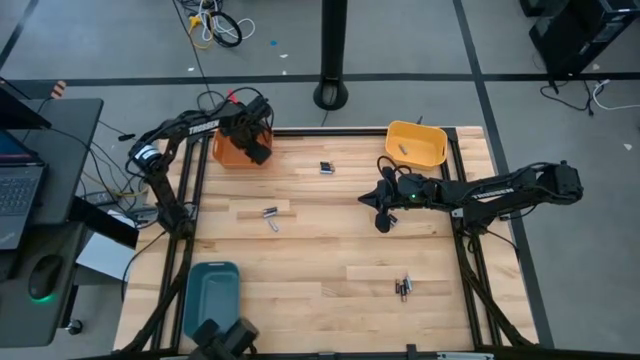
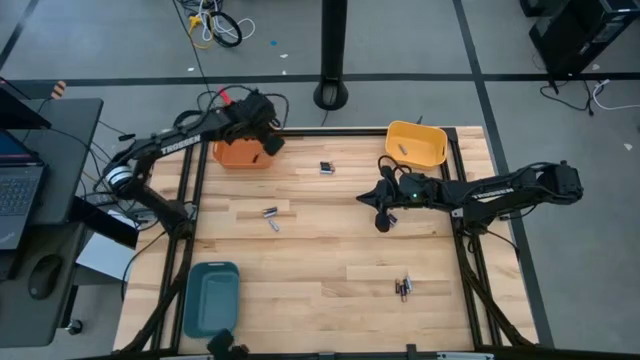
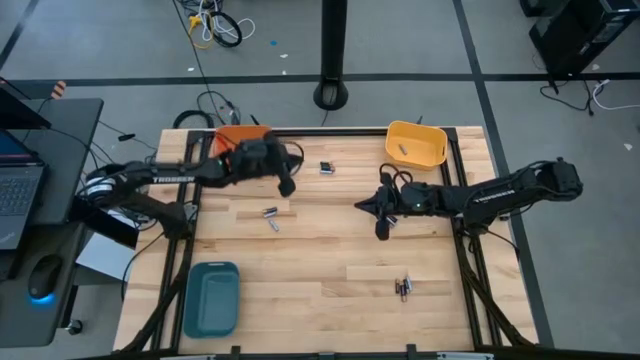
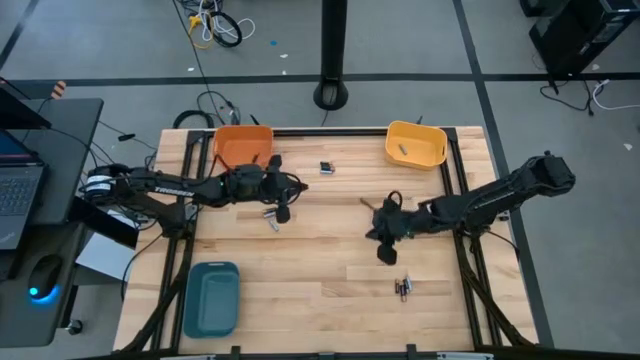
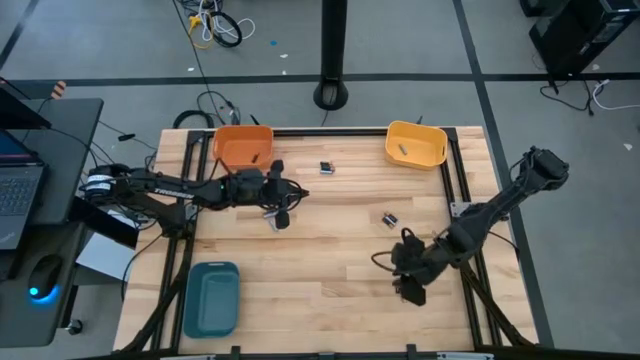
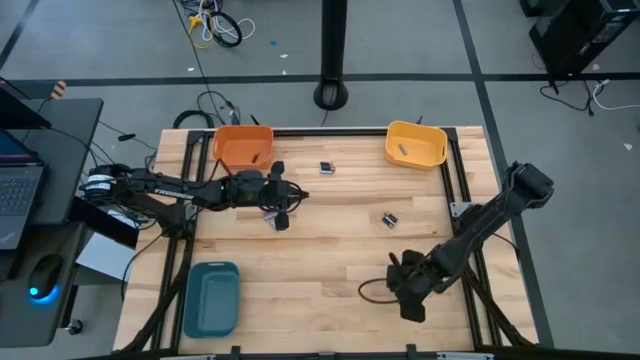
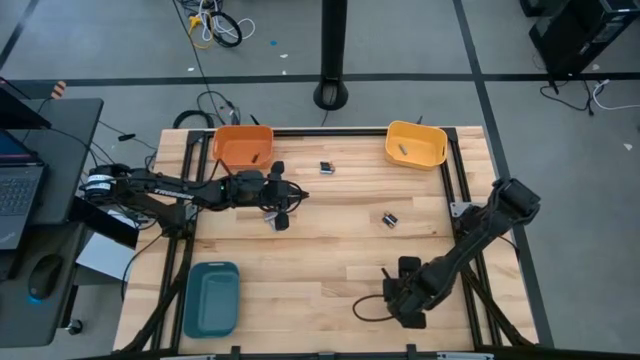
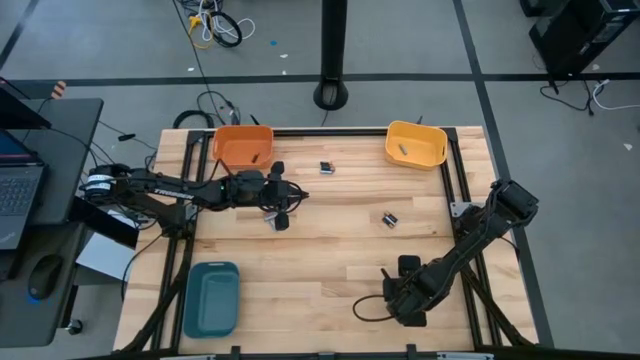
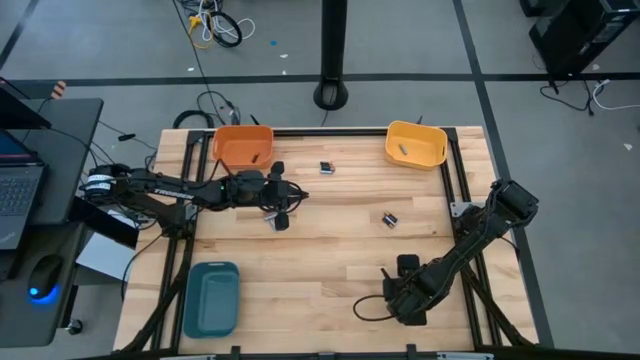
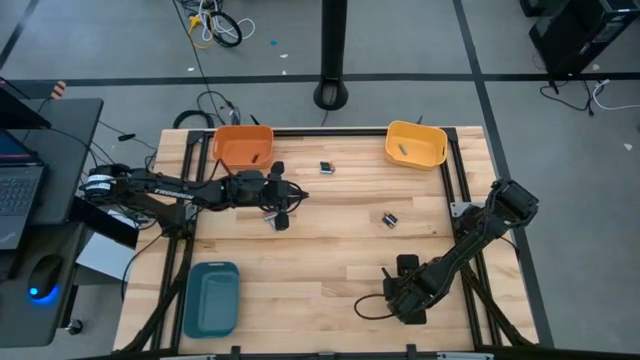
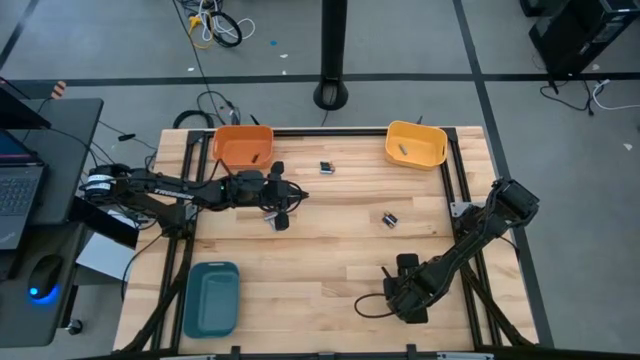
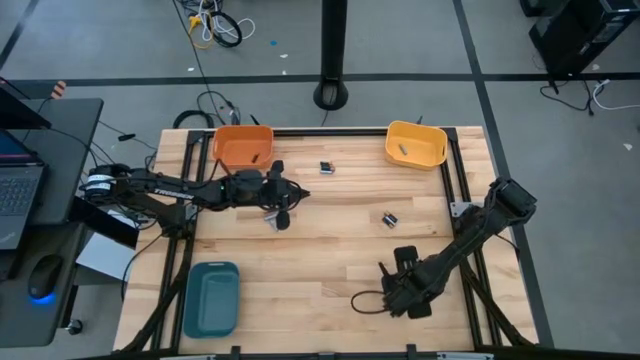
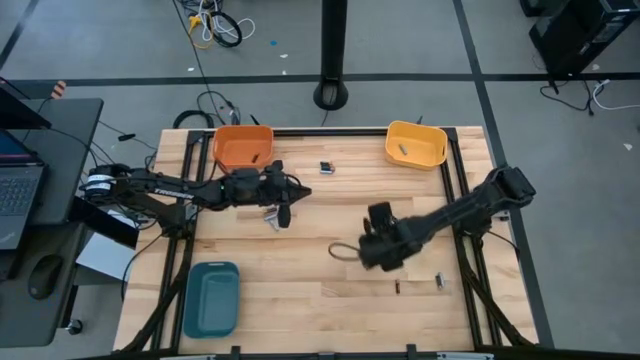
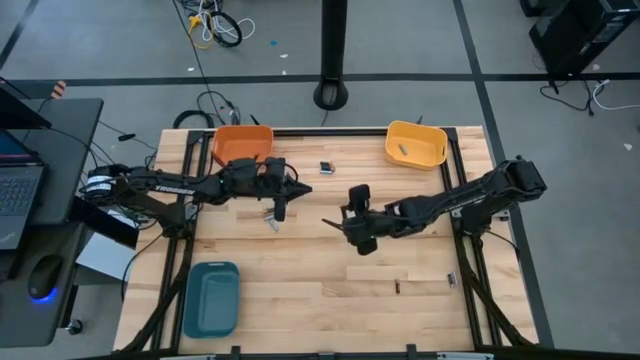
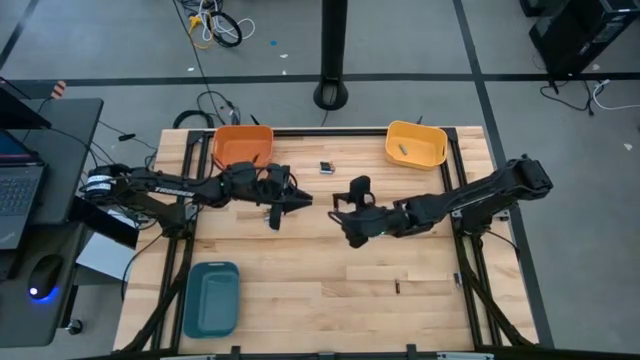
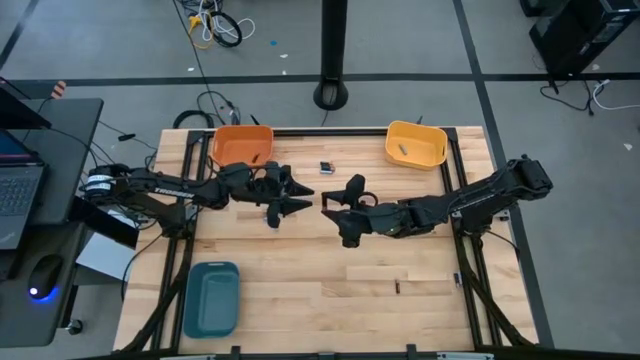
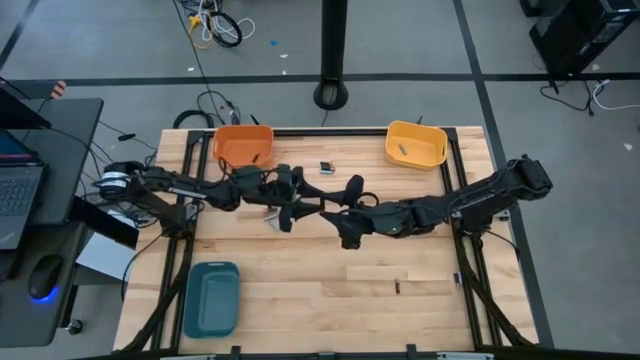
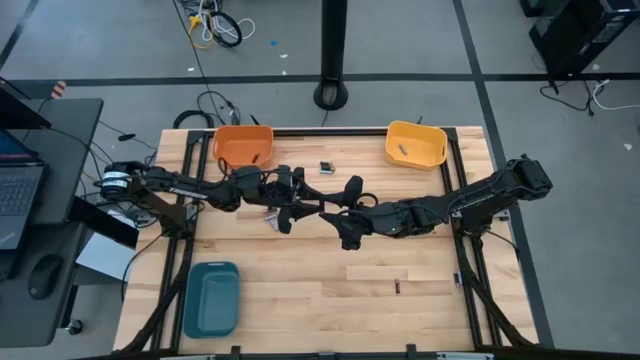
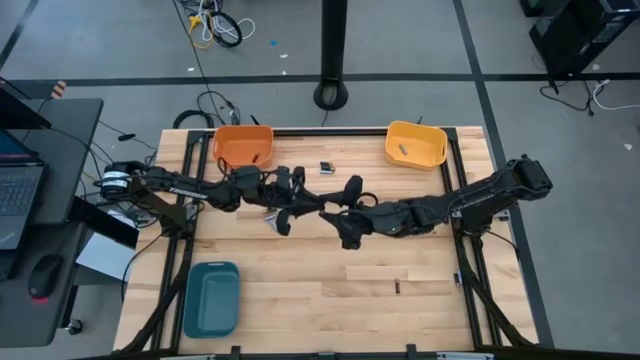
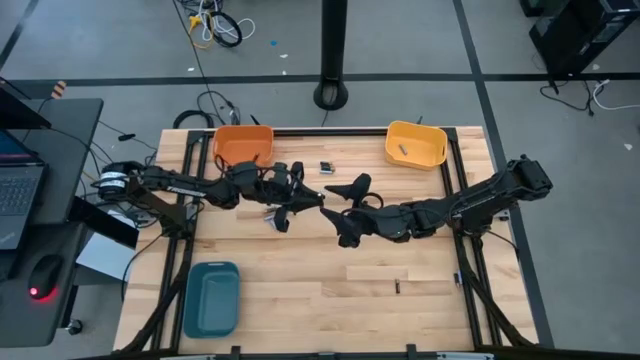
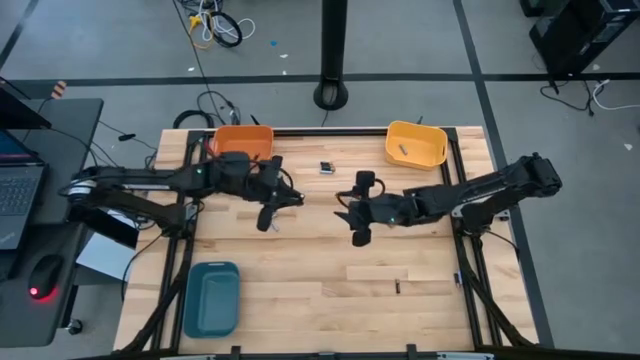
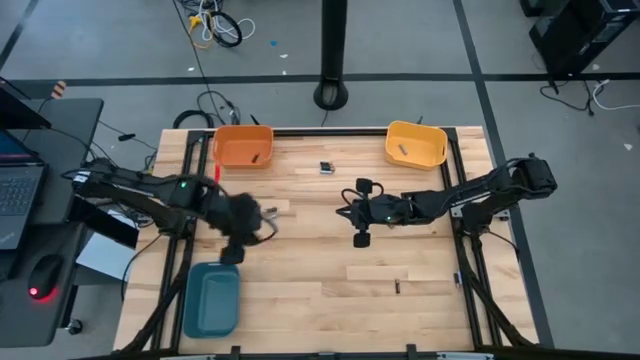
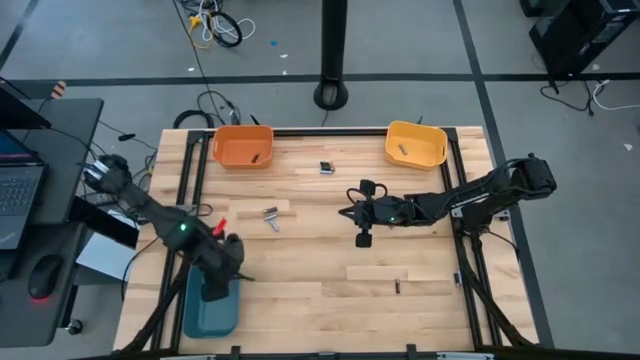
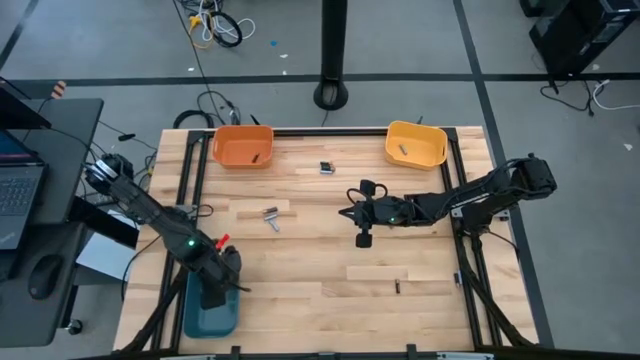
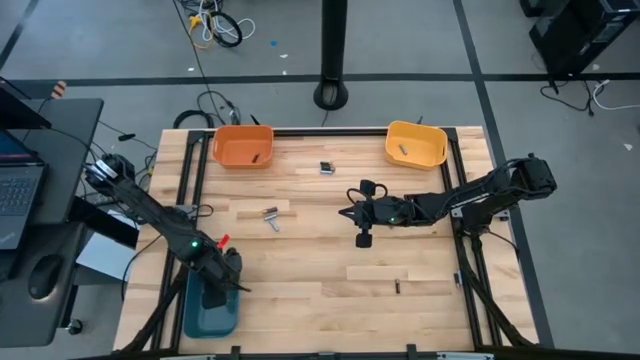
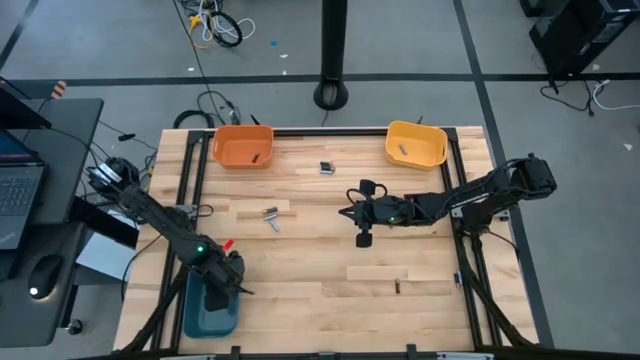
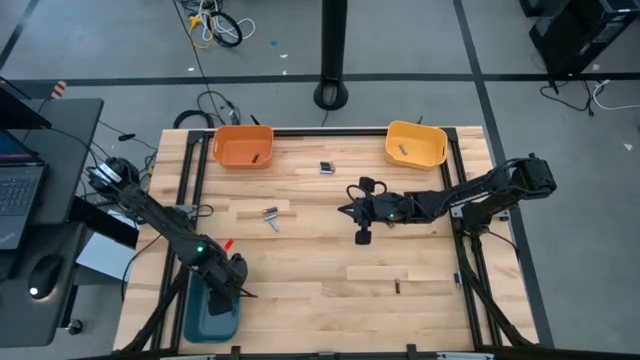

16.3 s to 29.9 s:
Task: Sort batteries
Put the big copper and black battery into the blue bin

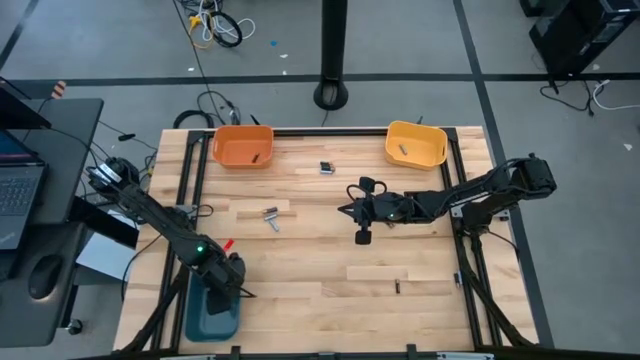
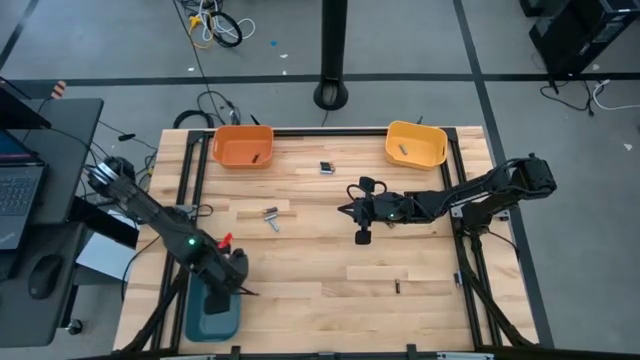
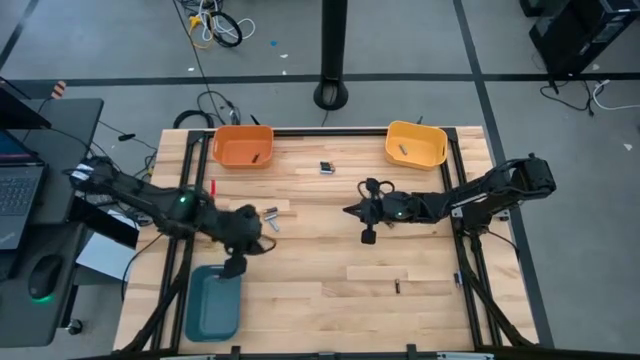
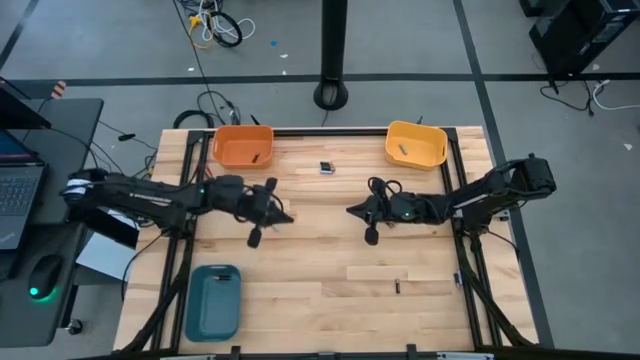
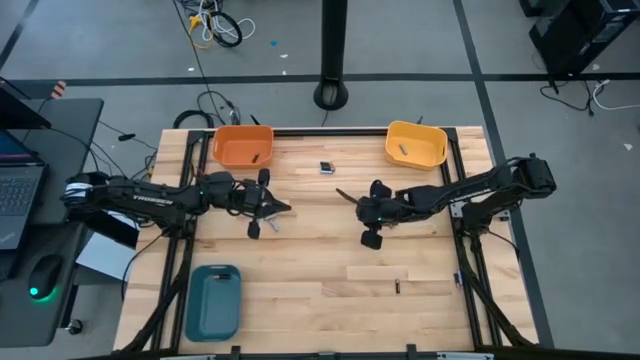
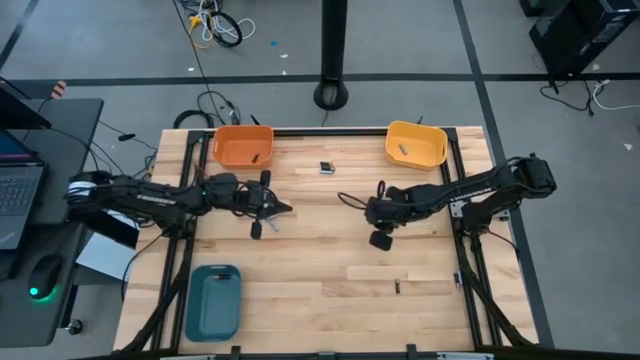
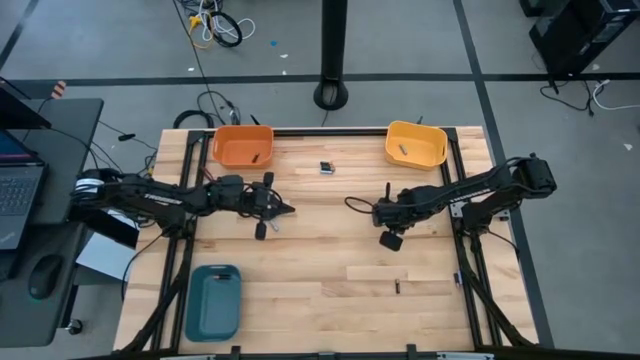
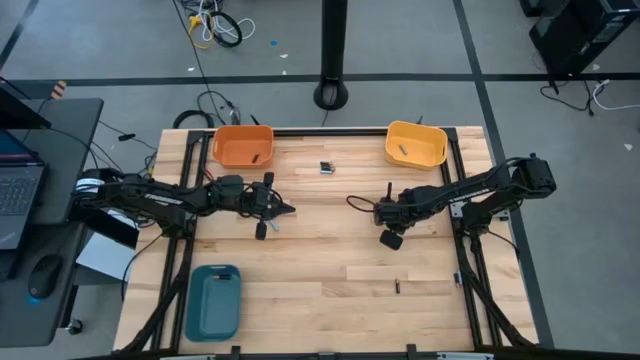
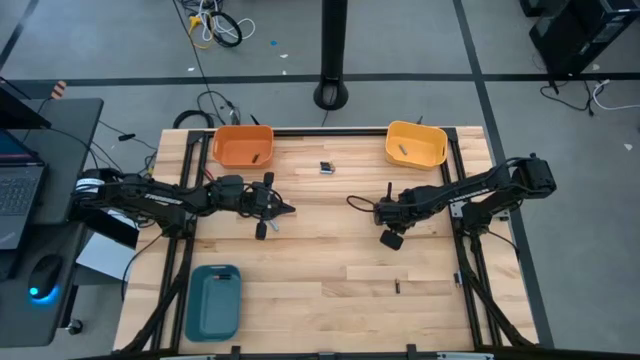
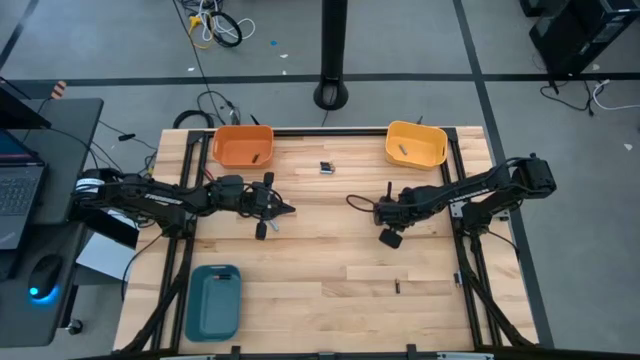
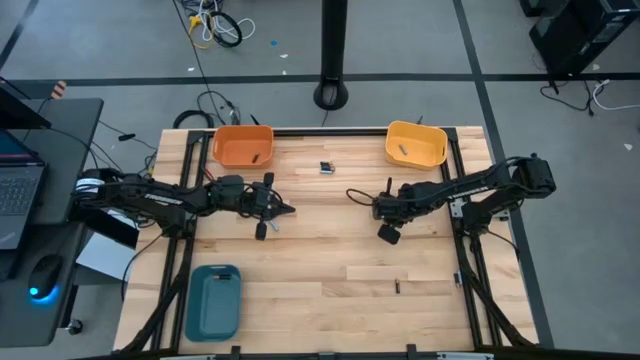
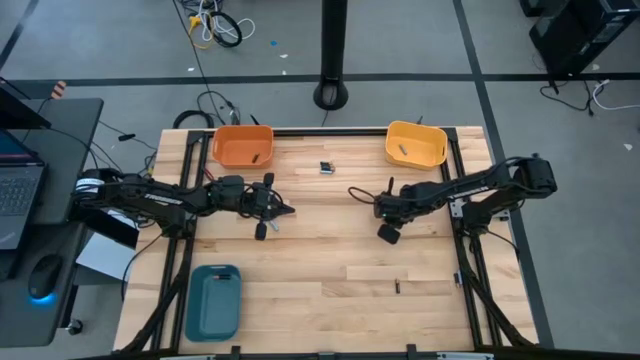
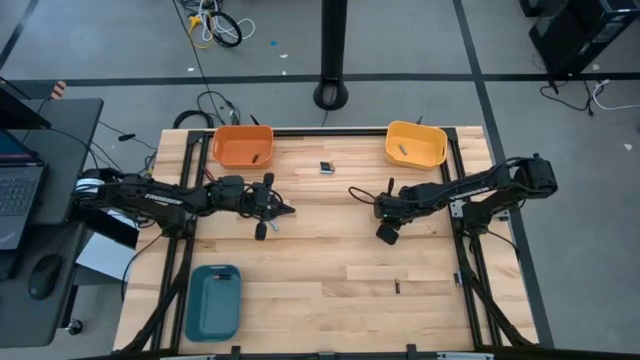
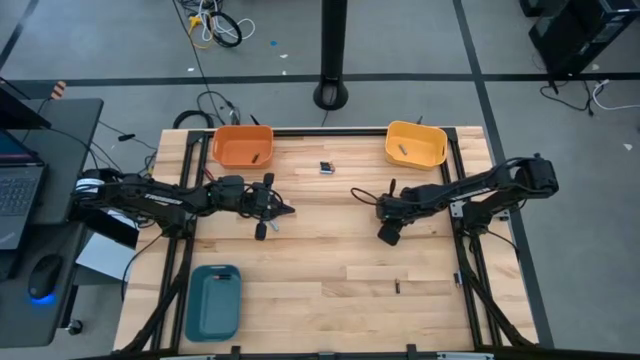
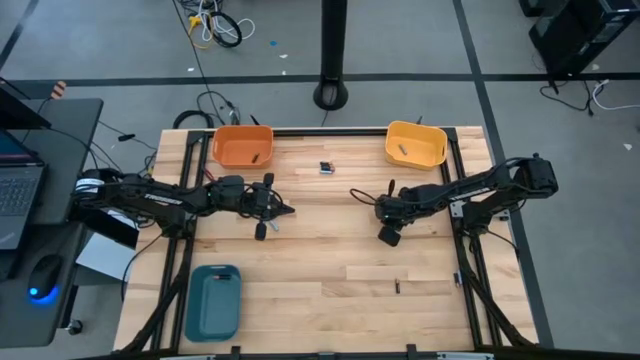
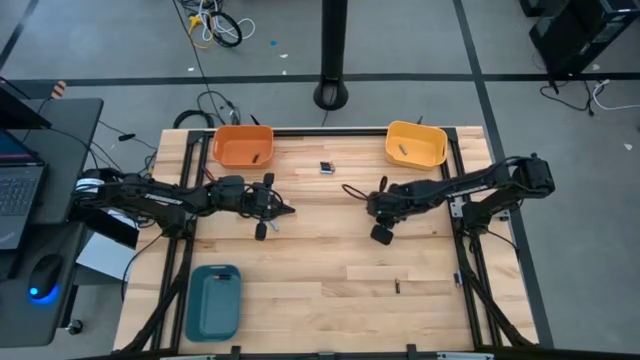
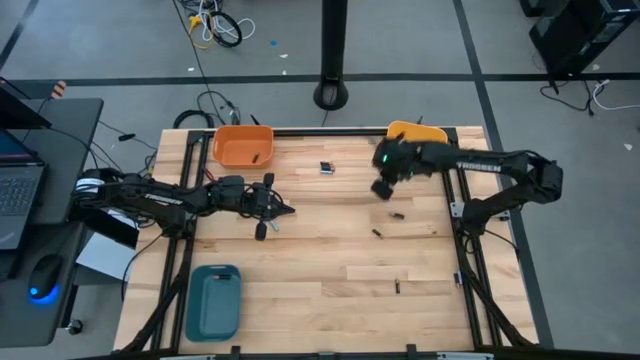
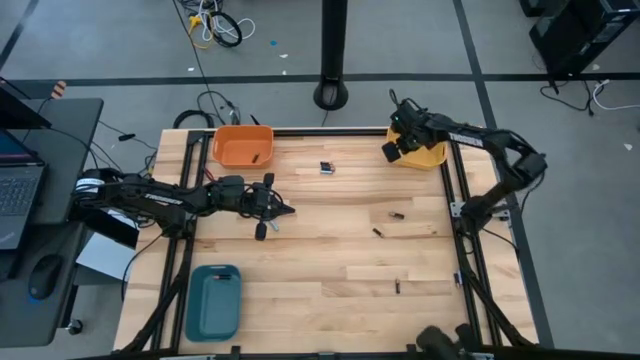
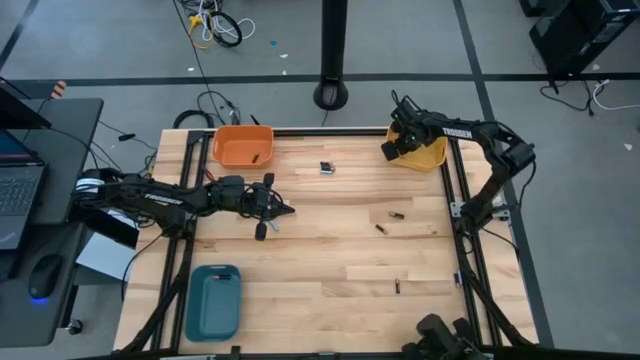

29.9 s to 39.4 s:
Put the small gray battery into the yellow bin
